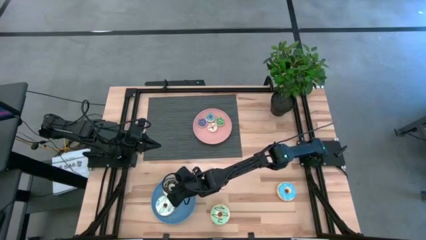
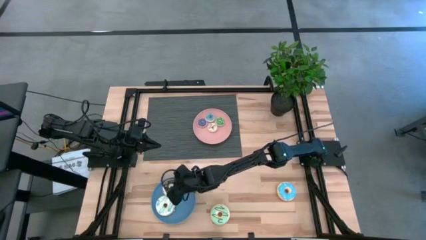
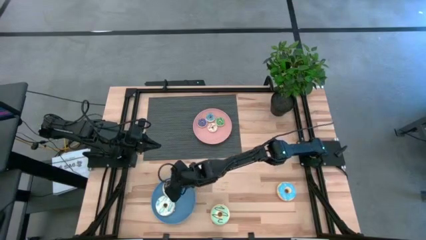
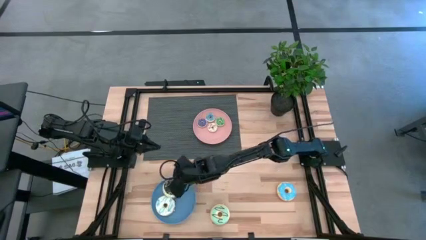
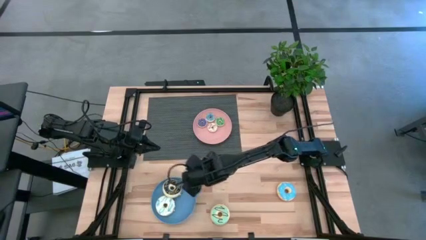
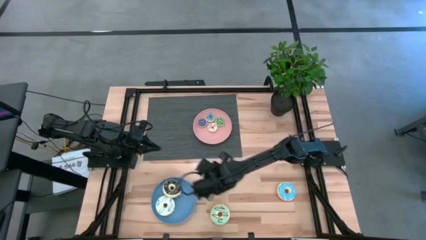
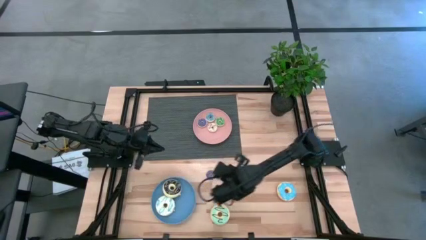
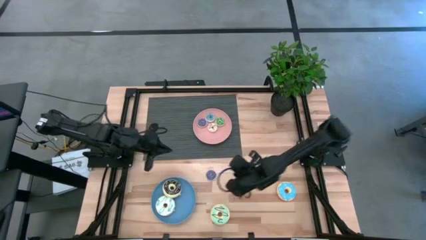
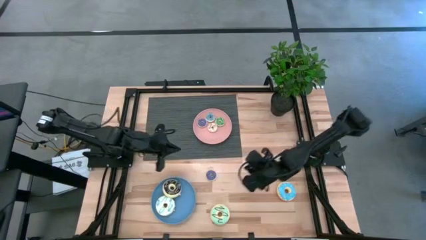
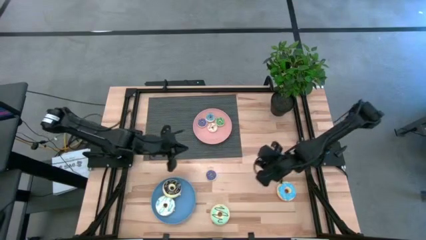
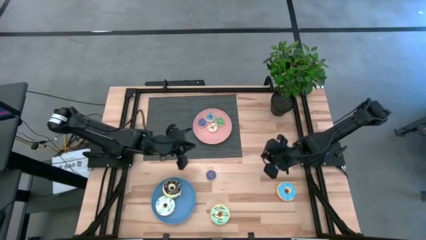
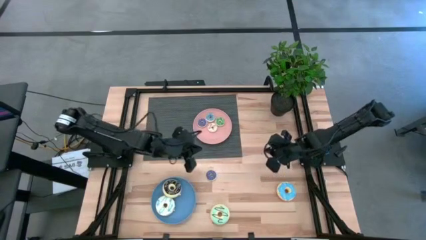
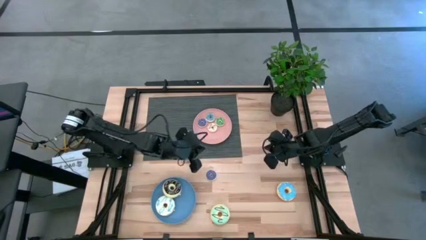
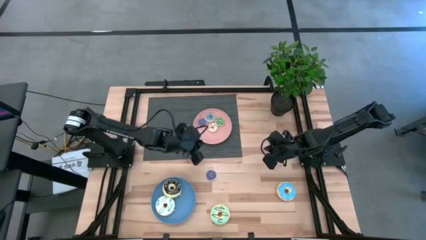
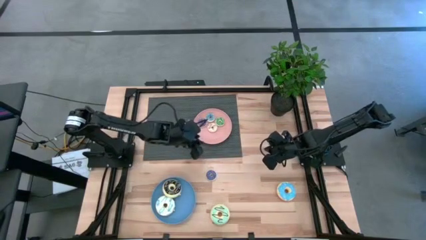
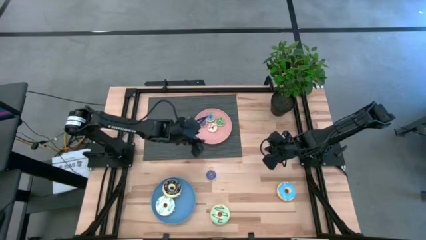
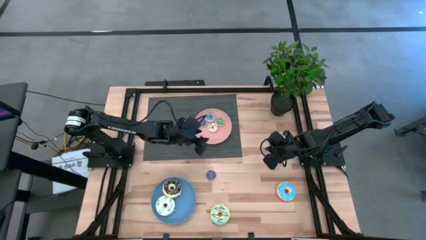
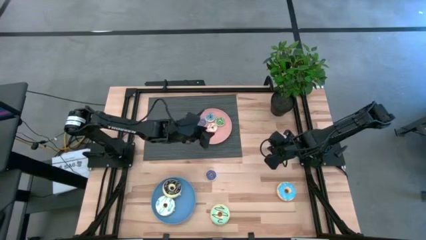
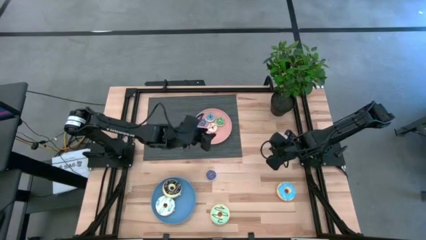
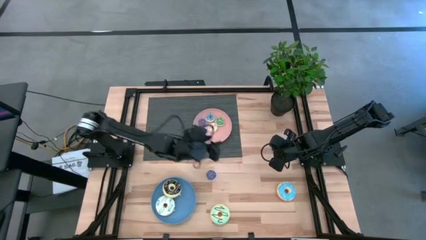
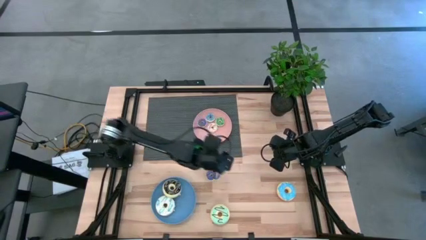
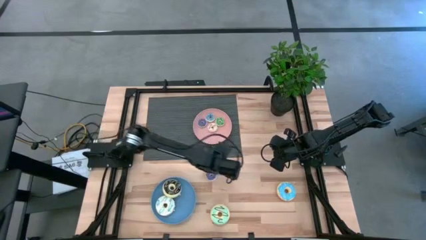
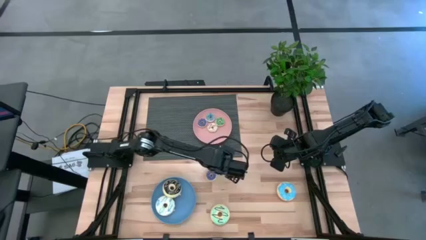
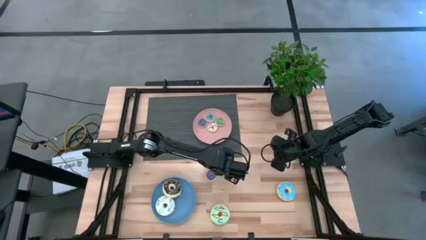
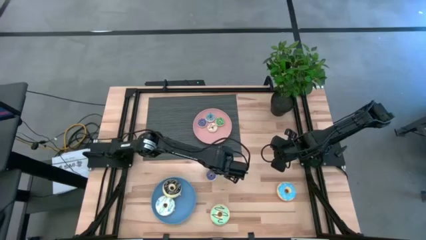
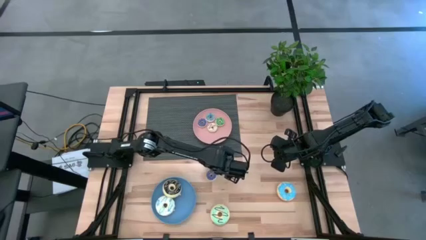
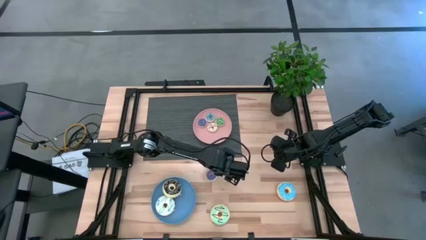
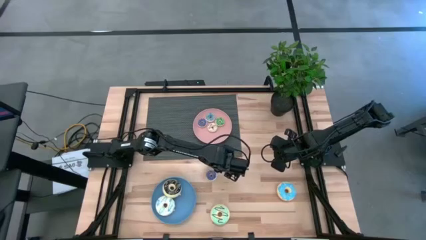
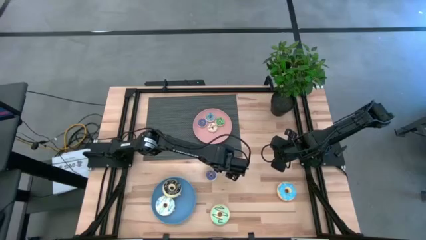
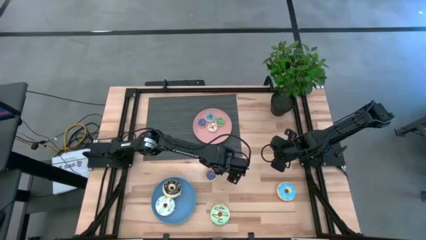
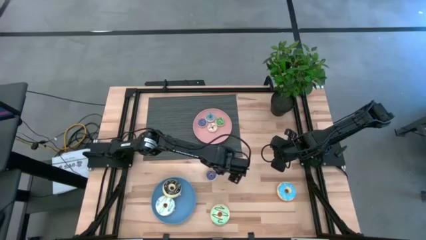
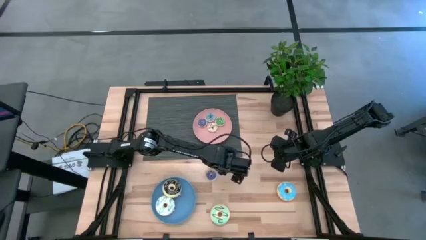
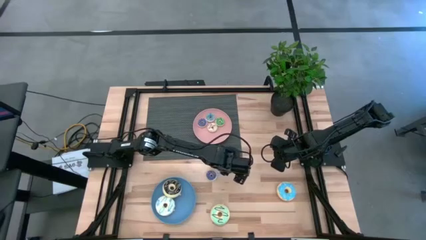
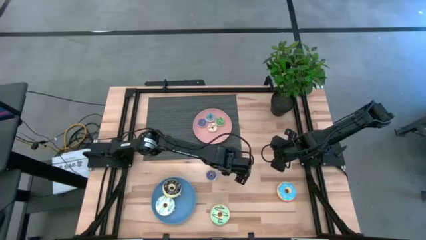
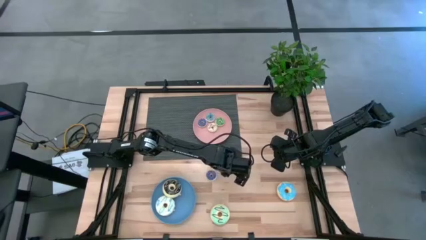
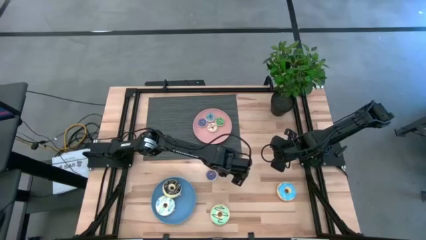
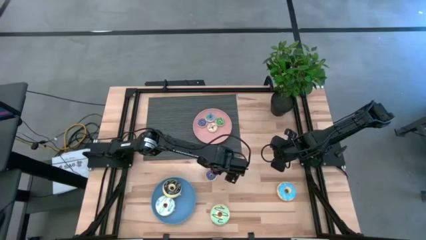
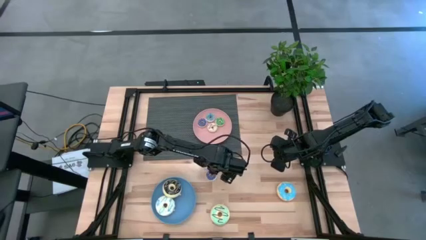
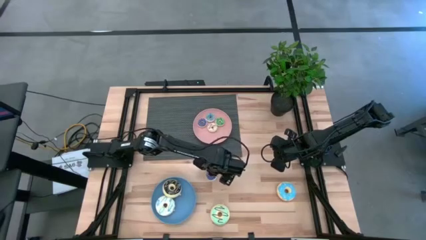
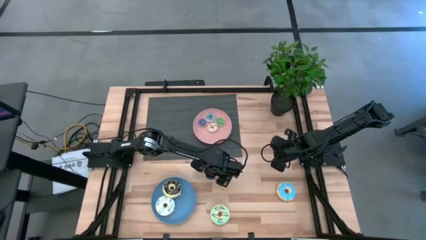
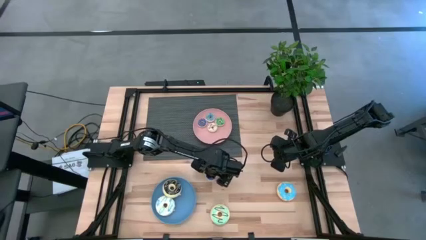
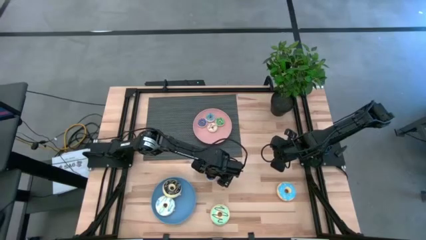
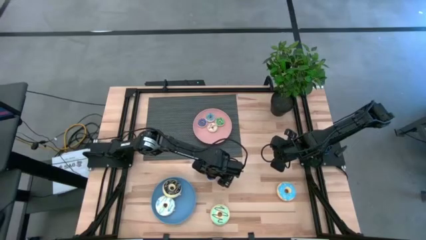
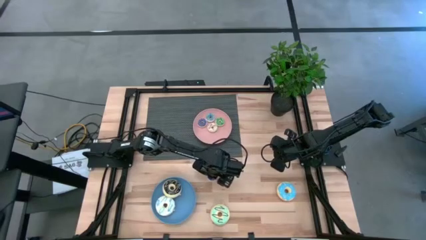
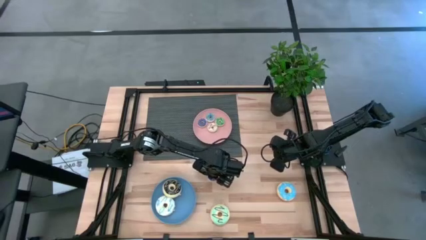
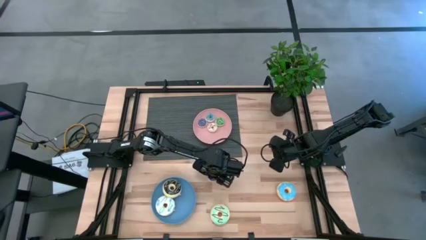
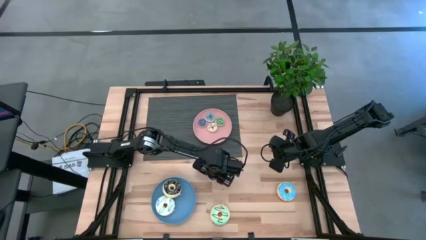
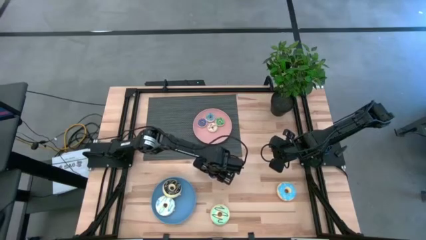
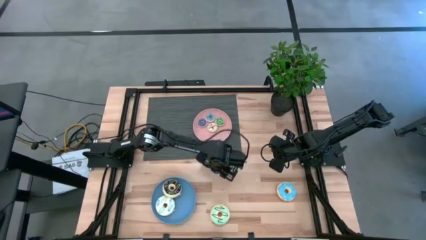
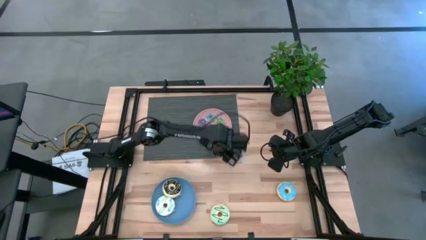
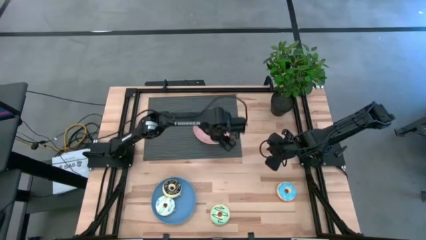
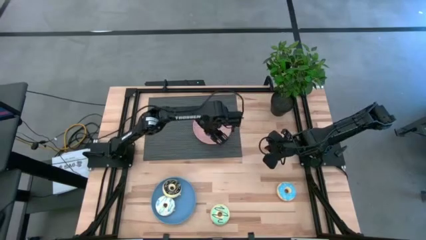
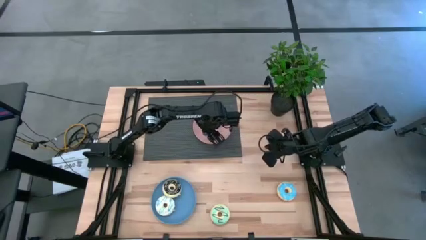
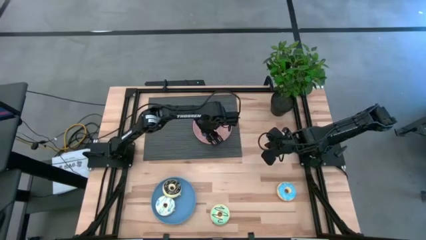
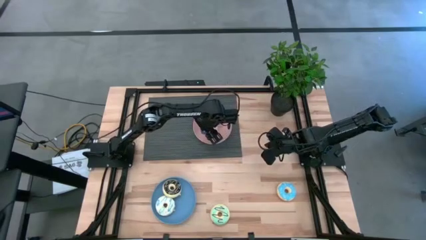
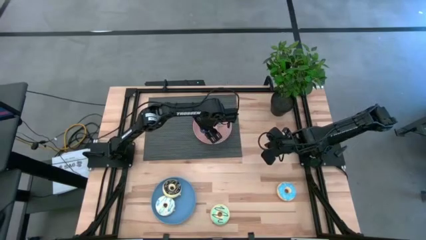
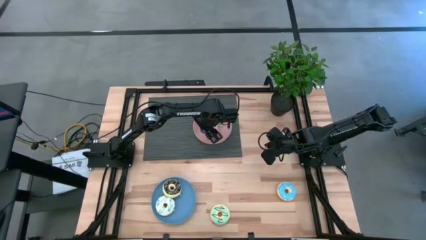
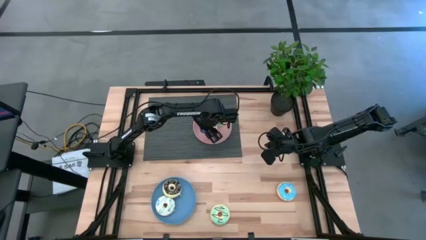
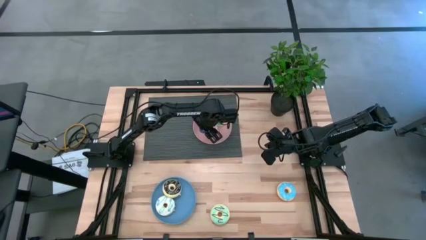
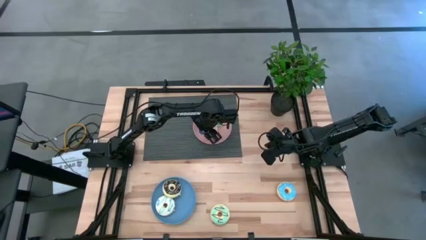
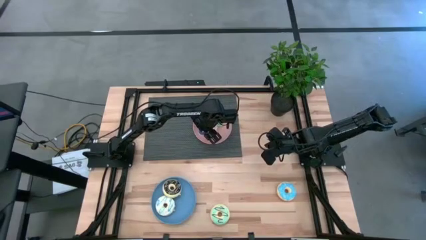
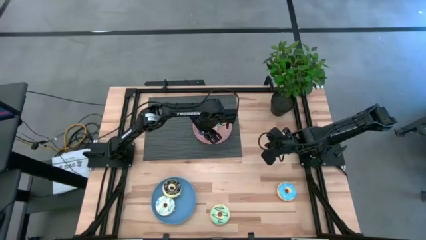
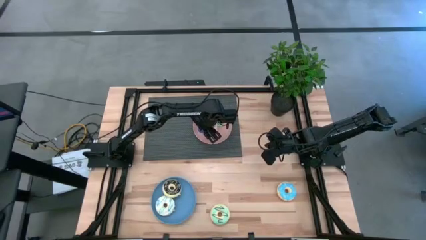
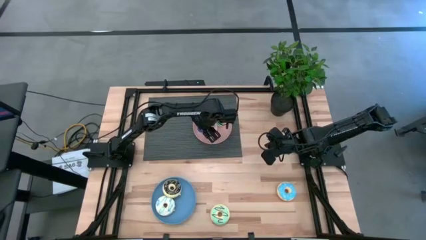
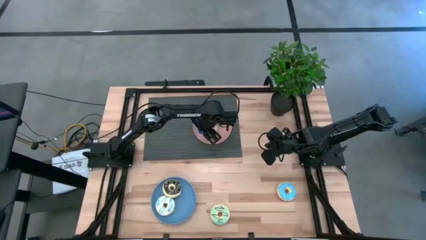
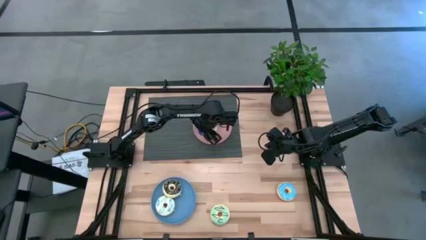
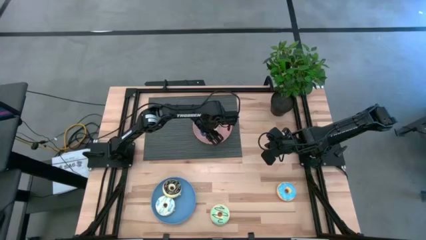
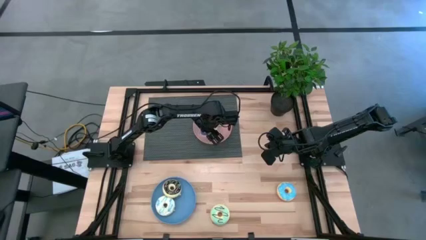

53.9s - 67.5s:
Task: Pick & Place donuts
Put the small blue donut on the pink plate
